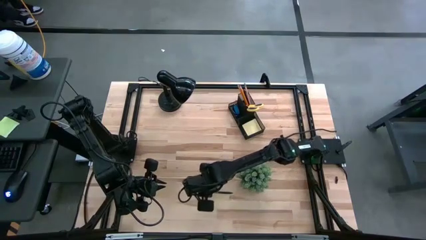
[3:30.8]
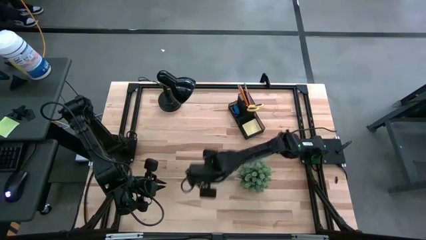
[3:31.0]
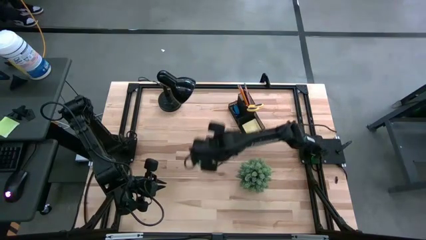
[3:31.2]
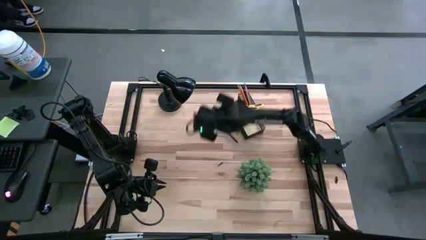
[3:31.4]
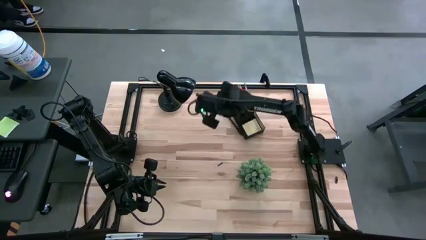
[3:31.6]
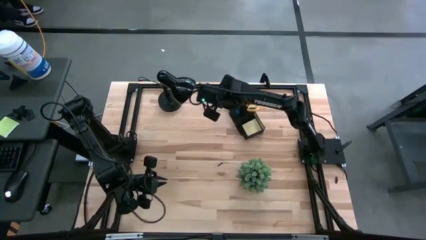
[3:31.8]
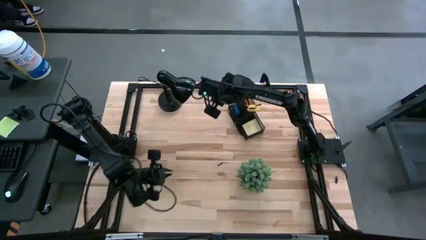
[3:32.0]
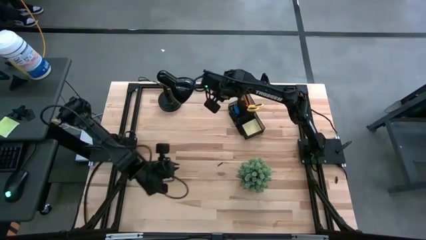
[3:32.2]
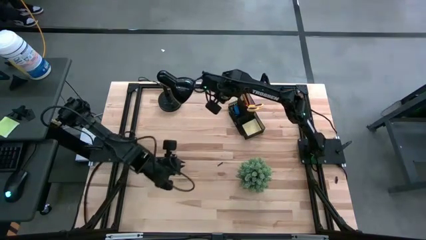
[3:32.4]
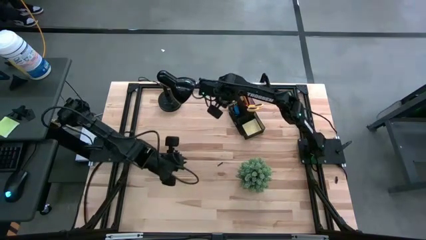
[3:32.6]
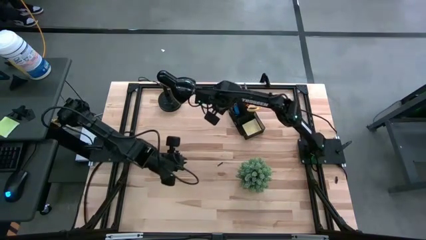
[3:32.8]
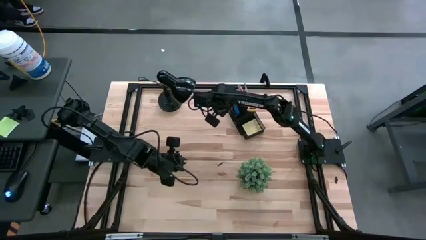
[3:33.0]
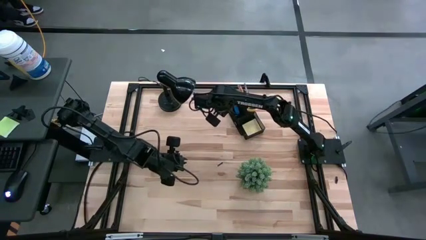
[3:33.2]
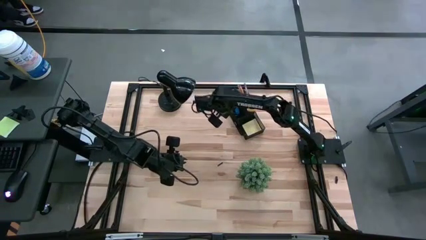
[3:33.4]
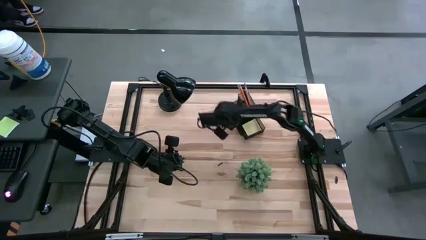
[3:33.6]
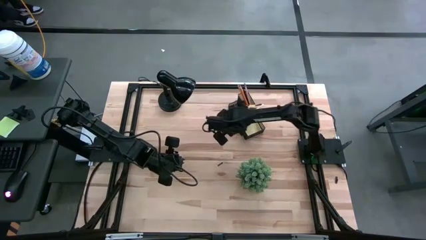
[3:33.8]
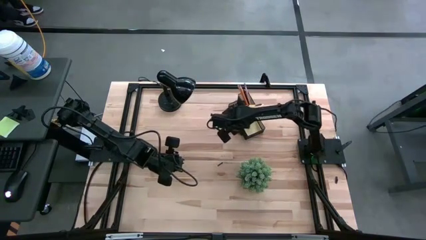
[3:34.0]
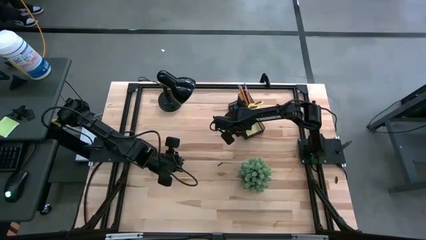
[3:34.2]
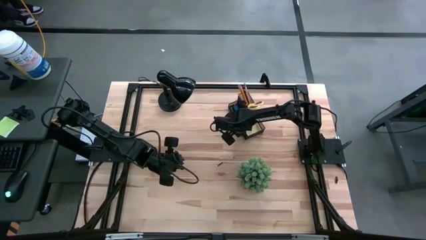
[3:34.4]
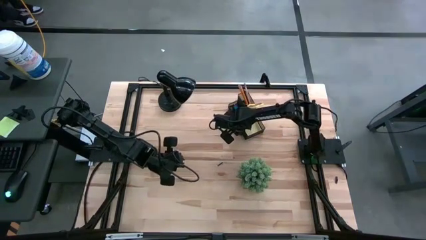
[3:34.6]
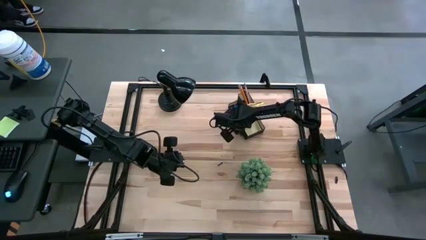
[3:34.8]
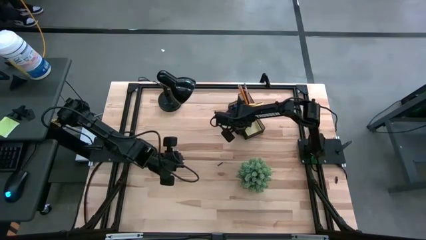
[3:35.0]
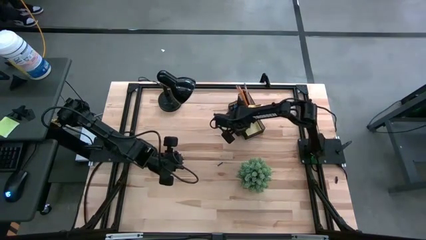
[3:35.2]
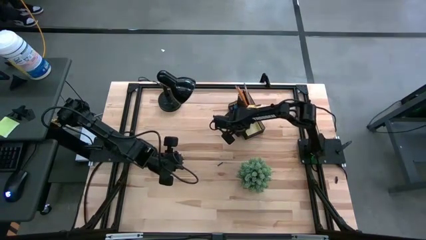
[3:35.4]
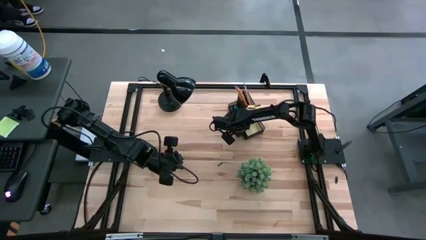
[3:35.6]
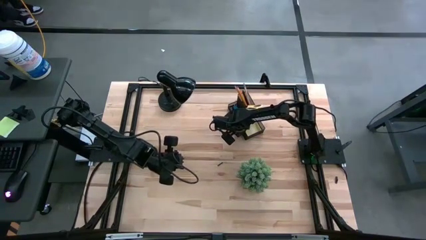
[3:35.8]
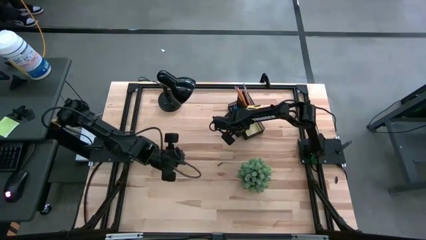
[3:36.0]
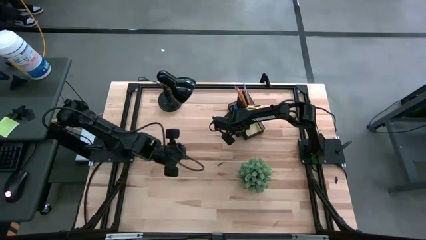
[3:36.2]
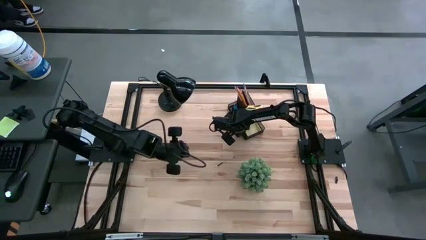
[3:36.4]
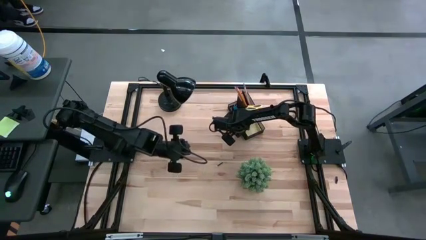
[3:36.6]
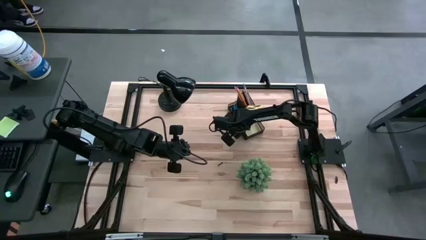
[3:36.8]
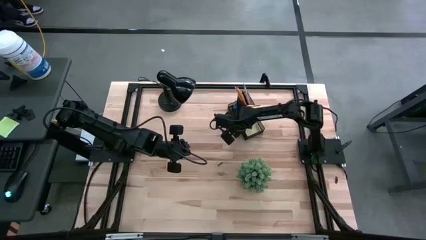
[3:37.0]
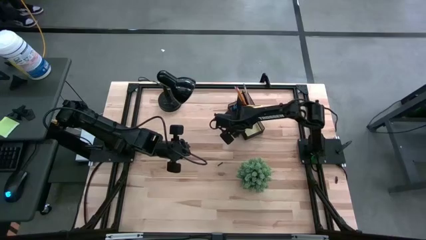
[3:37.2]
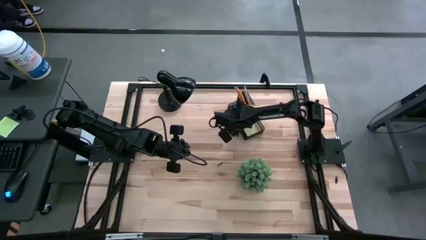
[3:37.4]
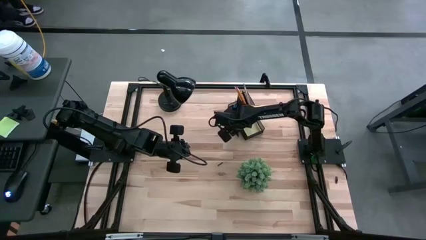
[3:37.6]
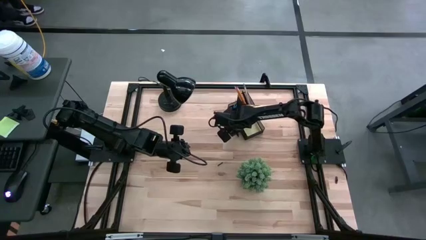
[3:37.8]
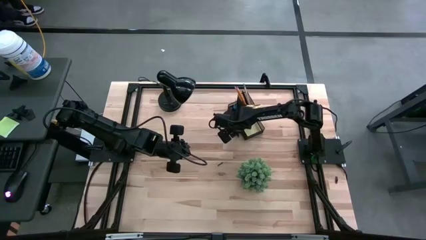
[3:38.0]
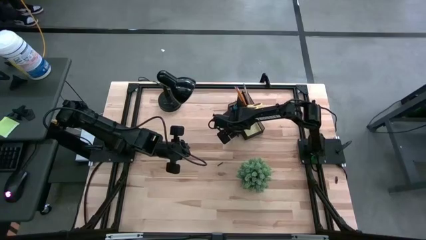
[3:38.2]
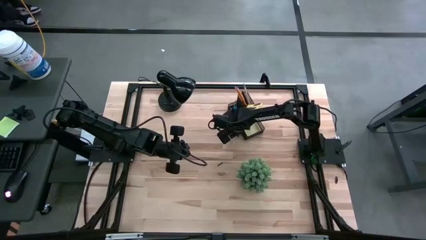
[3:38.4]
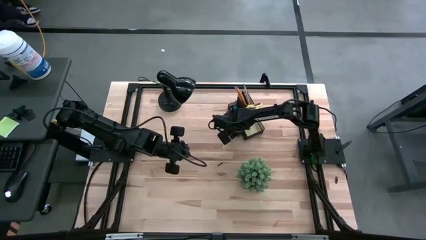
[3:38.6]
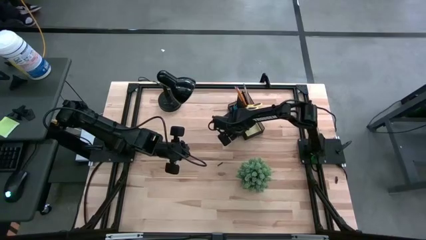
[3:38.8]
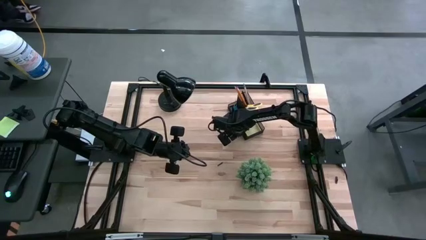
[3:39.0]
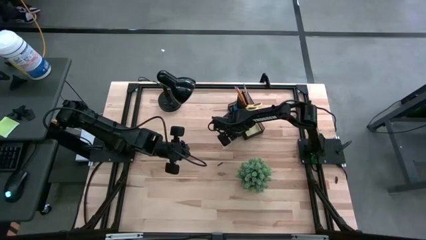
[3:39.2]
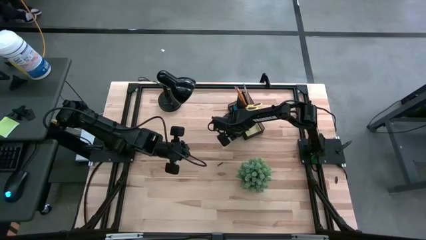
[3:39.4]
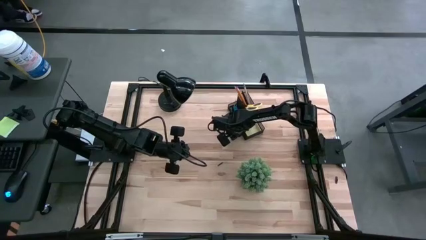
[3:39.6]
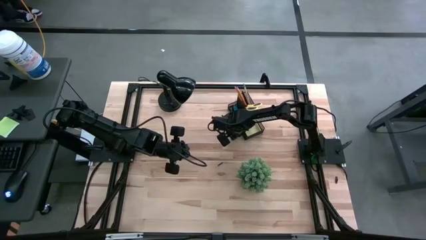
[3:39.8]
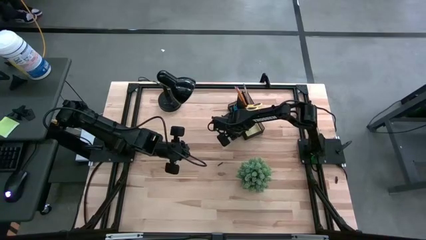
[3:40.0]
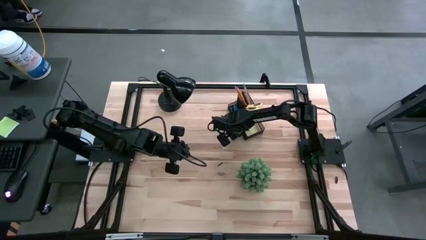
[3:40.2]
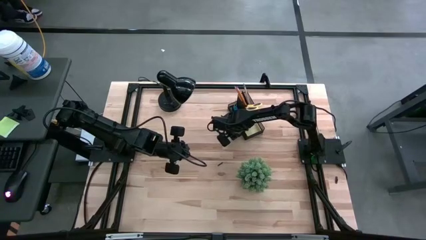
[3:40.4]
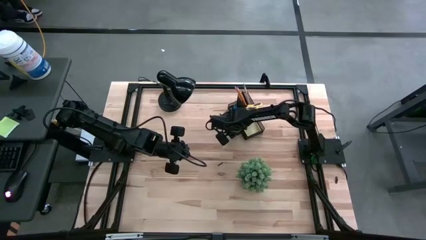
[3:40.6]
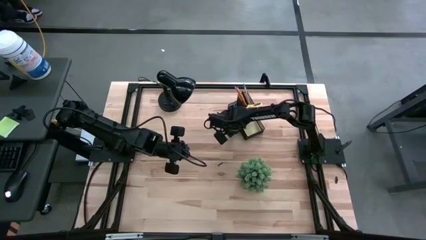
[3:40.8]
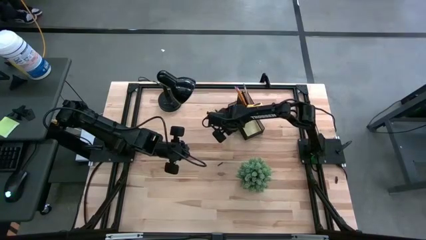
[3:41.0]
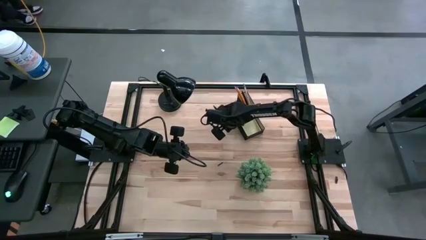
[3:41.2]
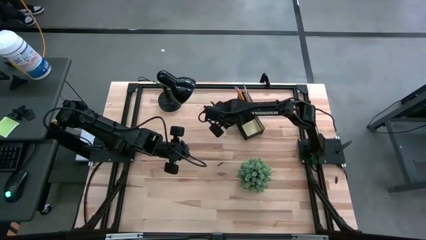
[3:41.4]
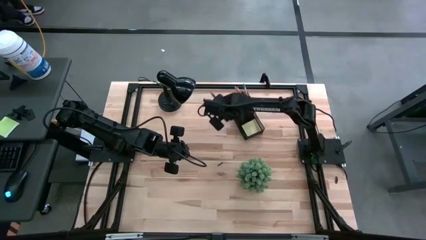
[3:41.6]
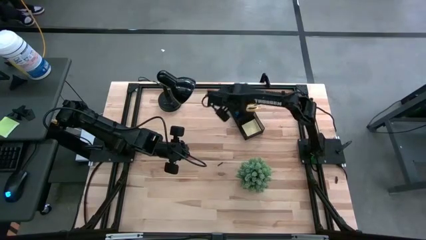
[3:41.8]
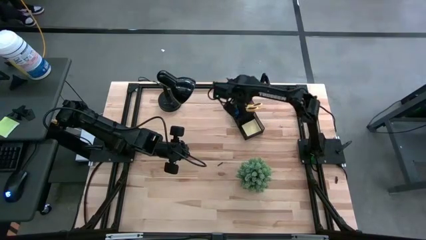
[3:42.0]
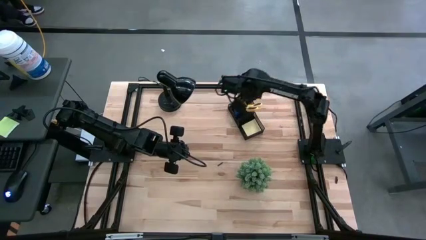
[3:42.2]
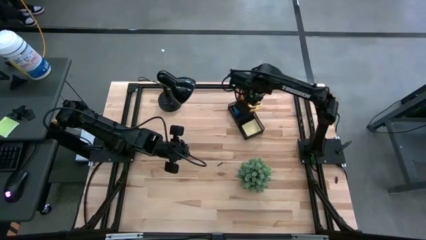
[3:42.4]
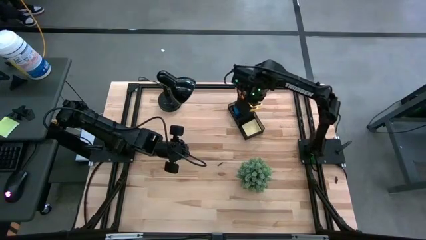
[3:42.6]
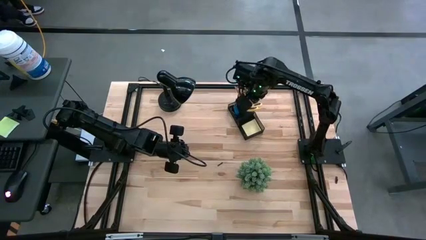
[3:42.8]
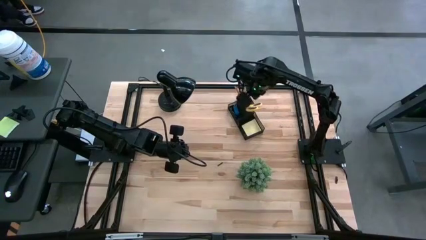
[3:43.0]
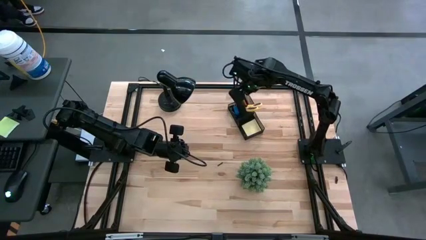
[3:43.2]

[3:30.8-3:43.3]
Task: Pick and place office supplies into organizer
Put the black pen into the desk organizer

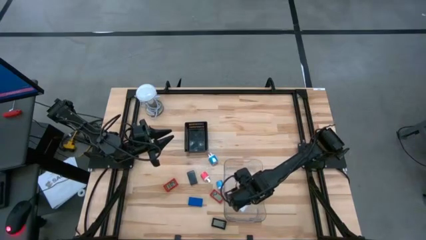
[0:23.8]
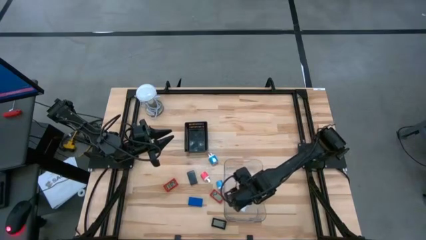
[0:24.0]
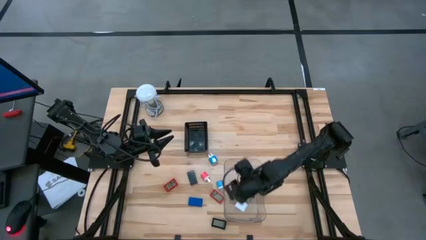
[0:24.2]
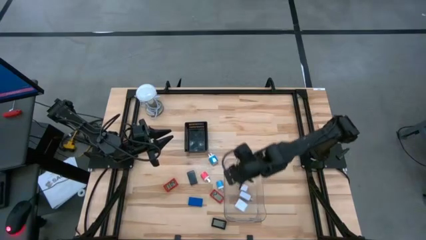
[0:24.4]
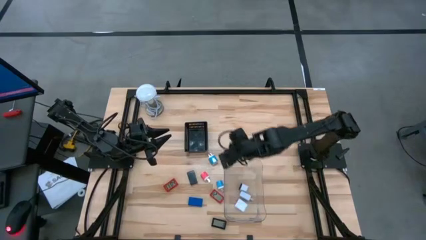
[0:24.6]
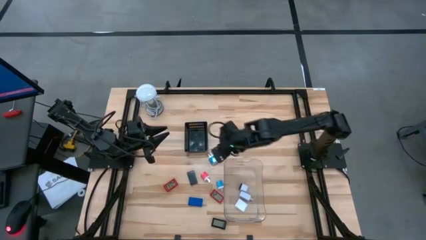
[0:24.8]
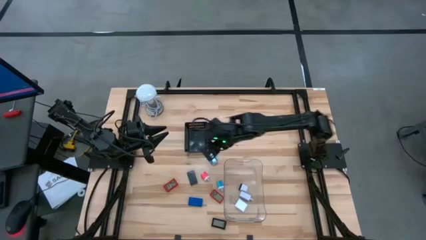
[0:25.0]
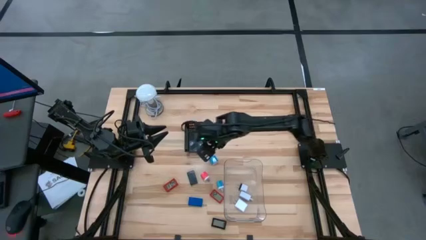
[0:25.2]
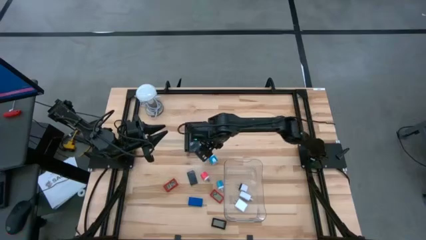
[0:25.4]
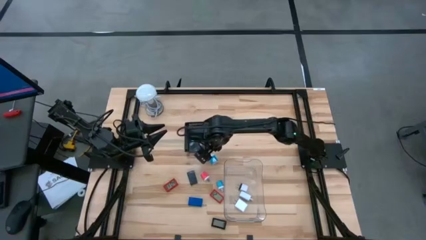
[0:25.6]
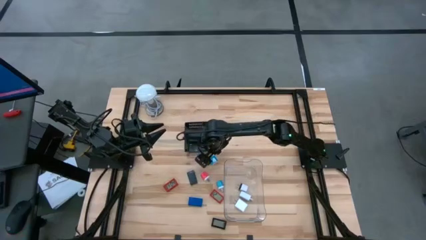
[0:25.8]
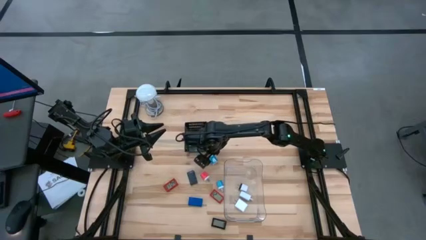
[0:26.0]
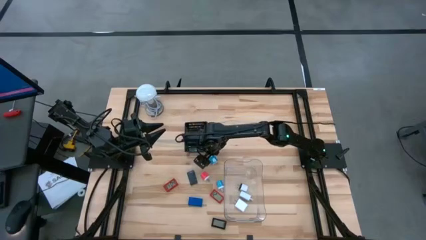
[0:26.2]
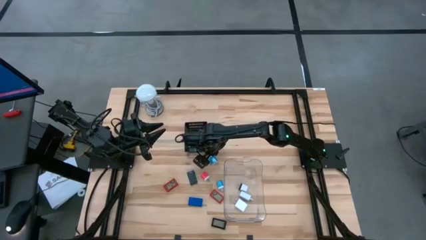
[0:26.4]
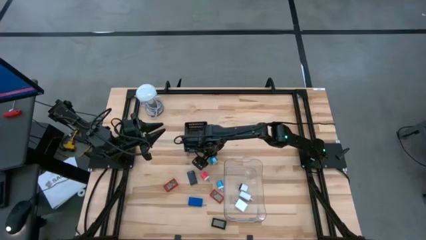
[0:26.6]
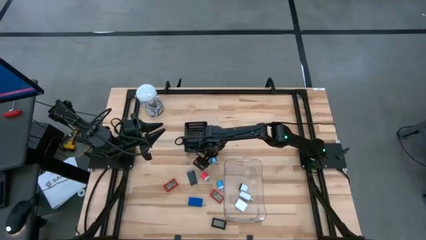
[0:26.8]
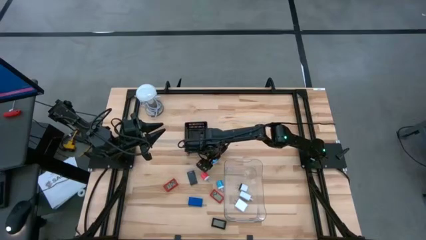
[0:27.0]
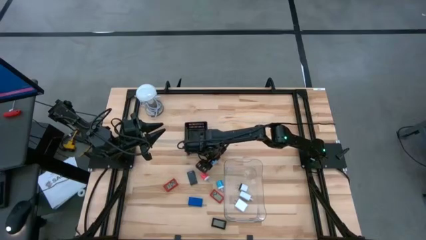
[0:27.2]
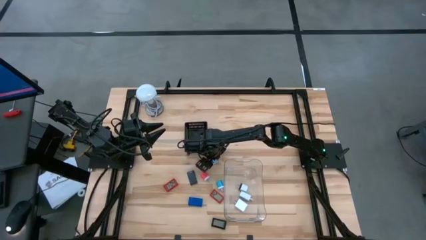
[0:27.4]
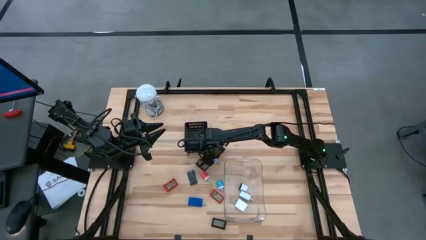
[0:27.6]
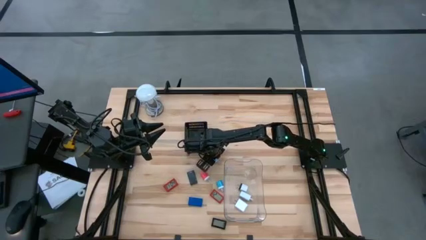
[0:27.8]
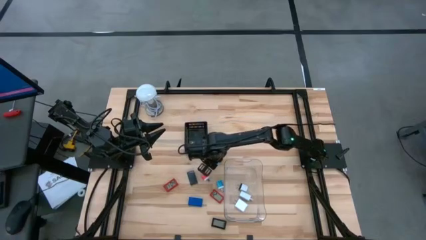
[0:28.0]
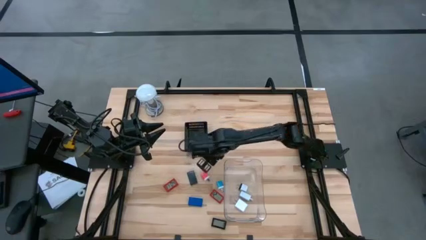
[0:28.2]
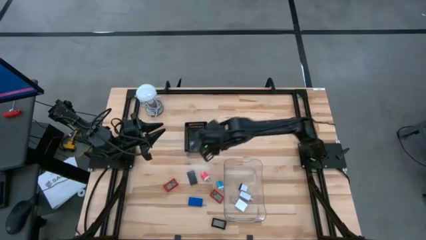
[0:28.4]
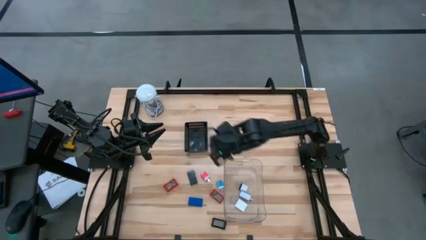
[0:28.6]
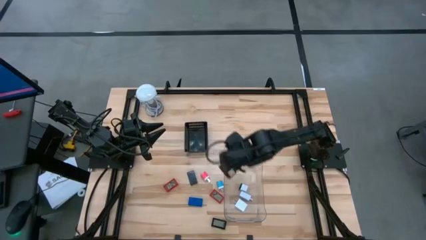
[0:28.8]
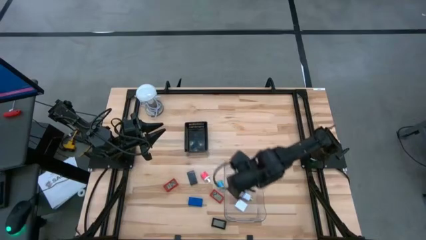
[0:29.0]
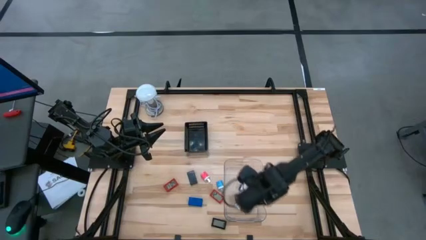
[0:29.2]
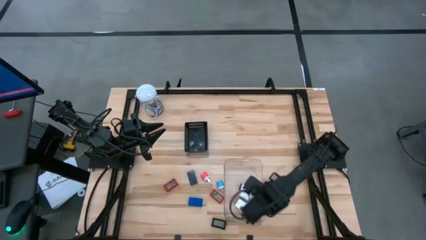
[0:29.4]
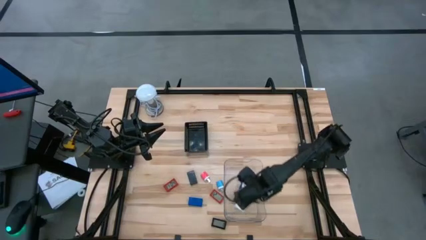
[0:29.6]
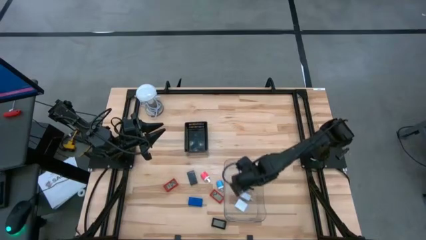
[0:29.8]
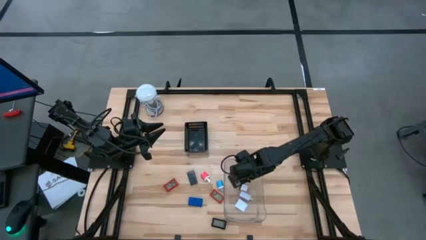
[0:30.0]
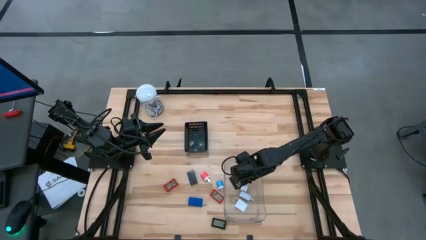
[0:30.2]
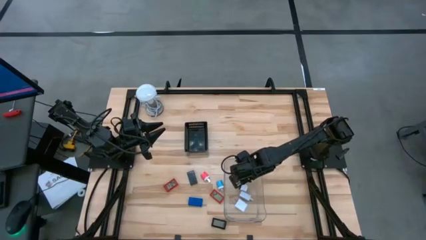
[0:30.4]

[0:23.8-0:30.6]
Task: Pick & Place Office items
Put the top blue charger adapter into the transparent bin
